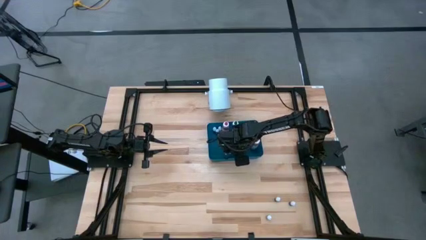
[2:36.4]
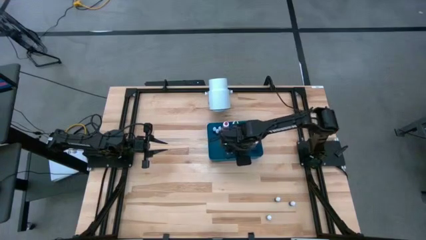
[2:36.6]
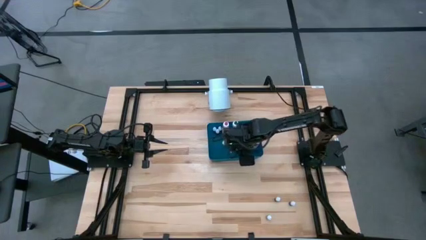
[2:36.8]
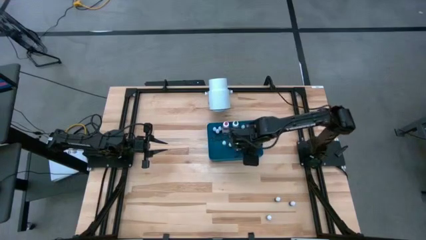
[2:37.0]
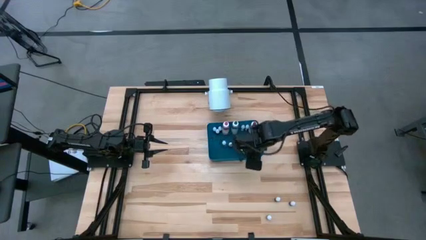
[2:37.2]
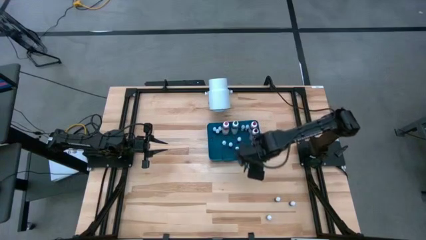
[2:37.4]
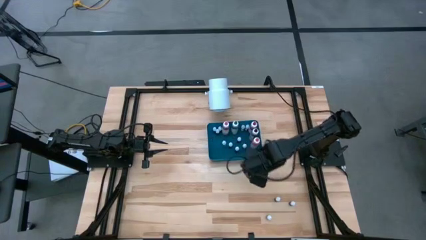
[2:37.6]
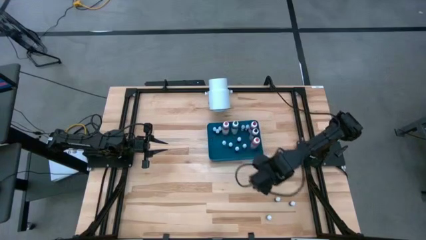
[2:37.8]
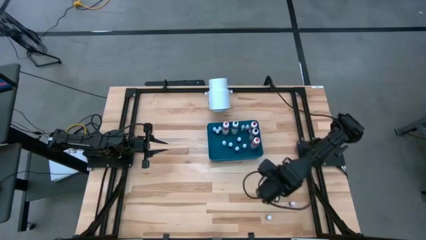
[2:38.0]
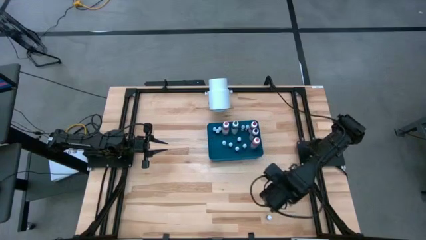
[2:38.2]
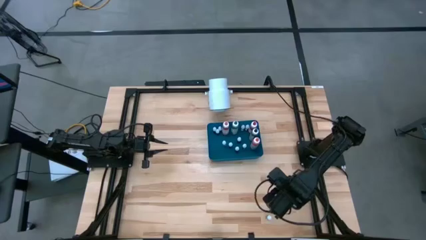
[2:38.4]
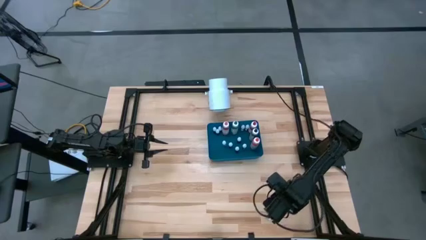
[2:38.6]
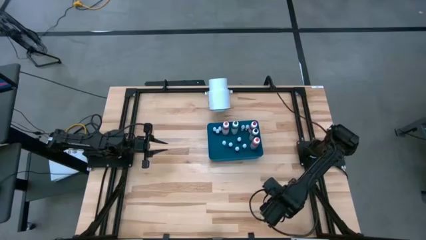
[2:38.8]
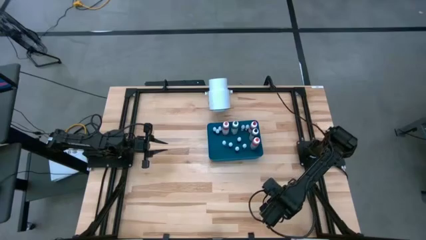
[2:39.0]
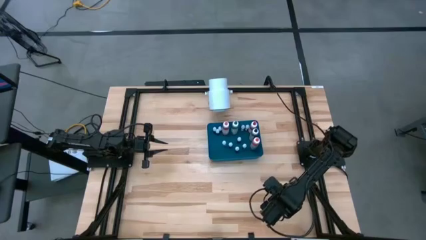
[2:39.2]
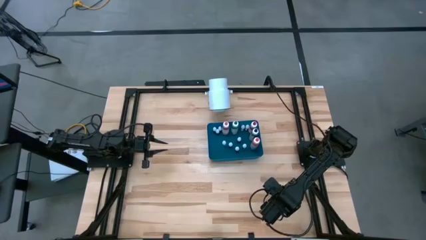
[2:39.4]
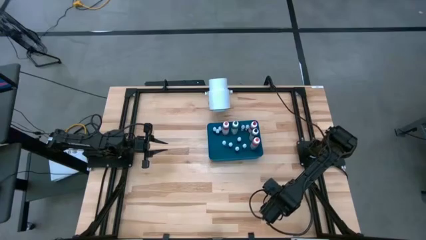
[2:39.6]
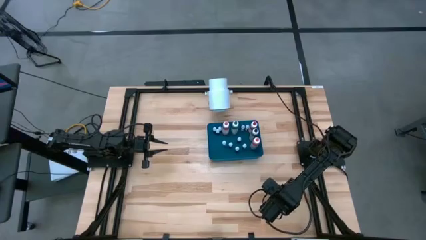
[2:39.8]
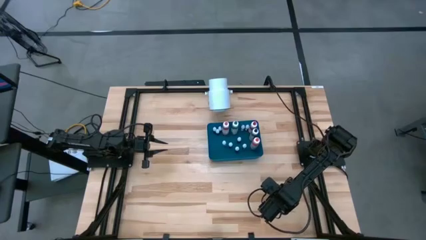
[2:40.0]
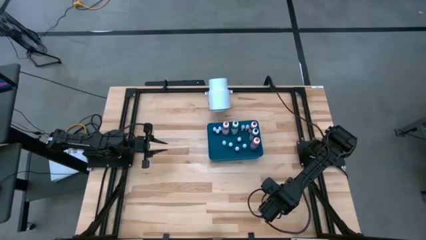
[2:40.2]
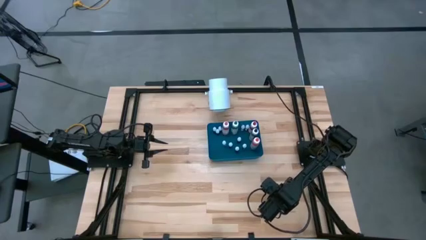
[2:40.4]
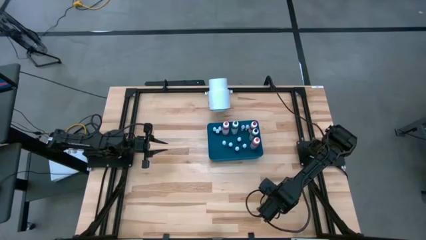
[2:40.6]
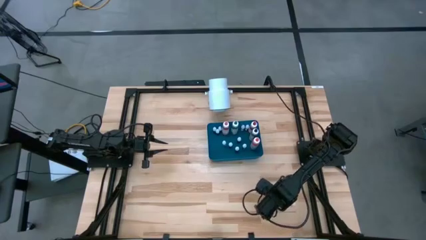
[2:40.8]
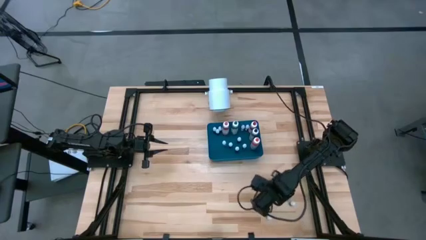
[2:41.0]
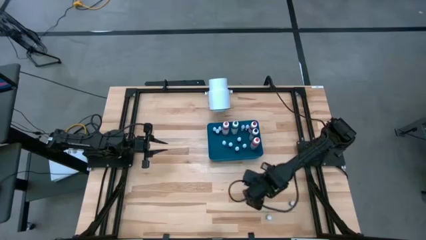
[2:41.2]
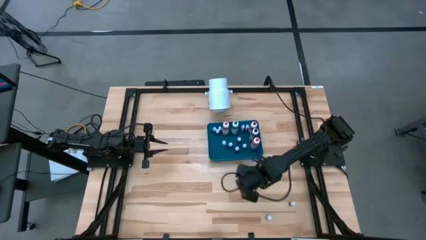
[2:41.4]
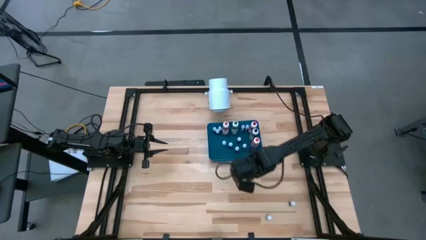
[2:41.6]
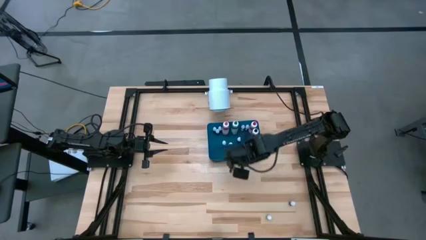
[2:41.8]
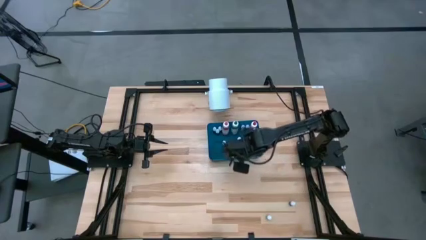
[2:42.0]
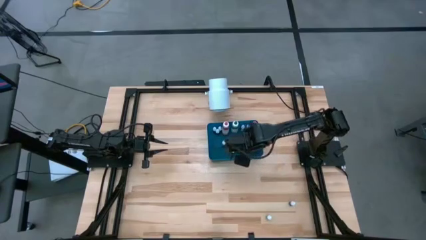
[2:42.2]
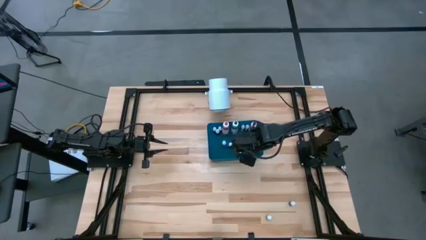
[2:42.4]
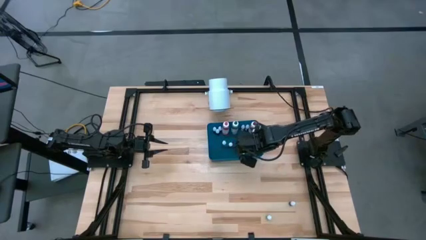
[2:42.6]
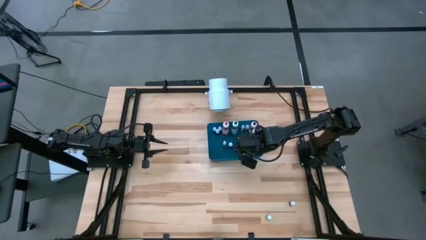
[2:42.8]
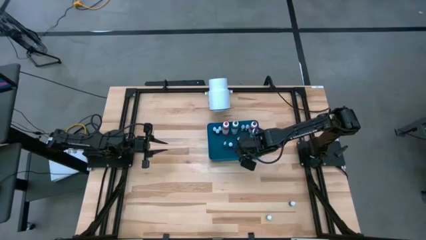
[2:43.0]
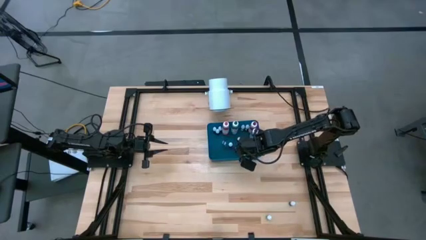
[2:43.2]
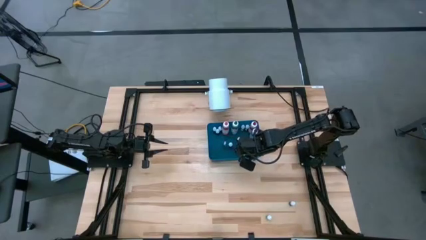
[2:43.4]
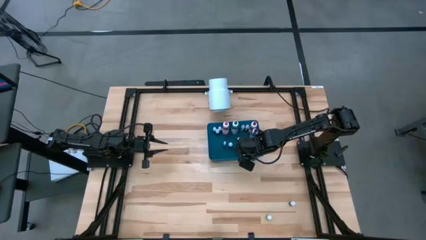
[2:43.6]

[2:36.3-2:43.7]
Task: Pick & Place food coloring
Put the top small black food coloring bottle into the blue bin

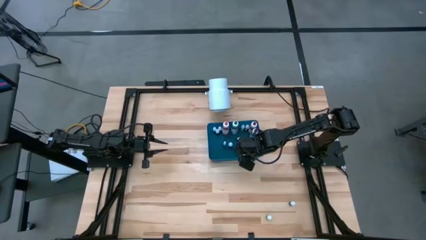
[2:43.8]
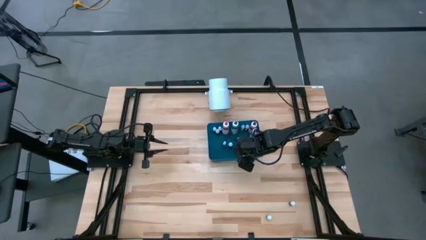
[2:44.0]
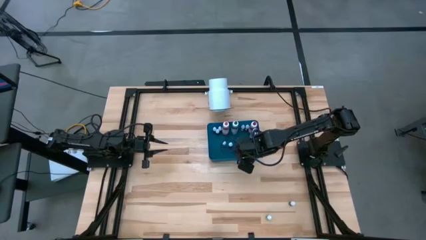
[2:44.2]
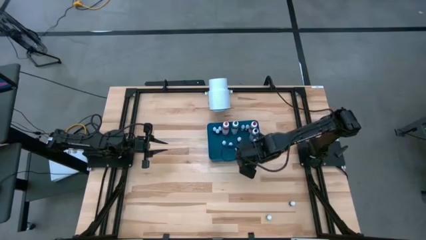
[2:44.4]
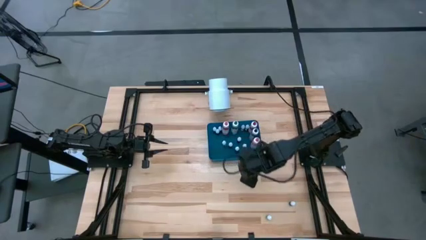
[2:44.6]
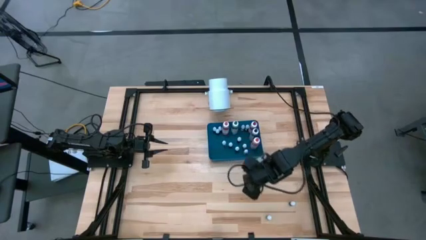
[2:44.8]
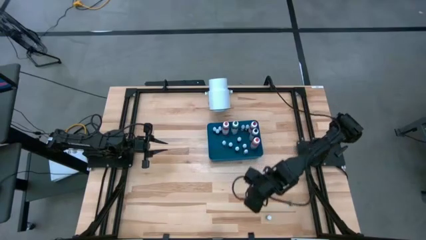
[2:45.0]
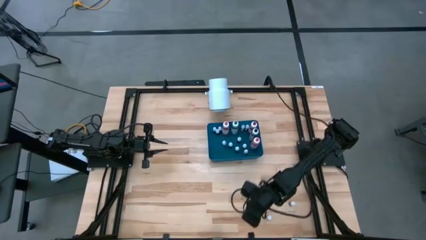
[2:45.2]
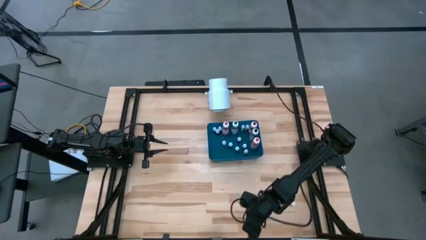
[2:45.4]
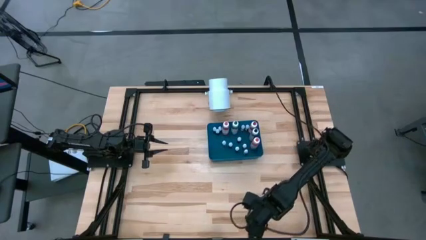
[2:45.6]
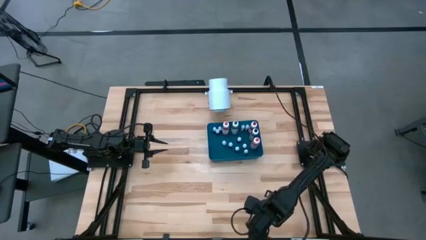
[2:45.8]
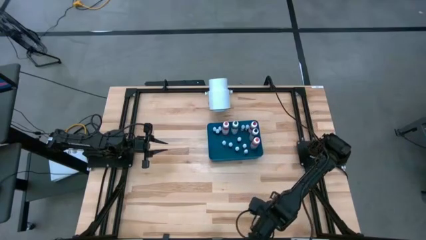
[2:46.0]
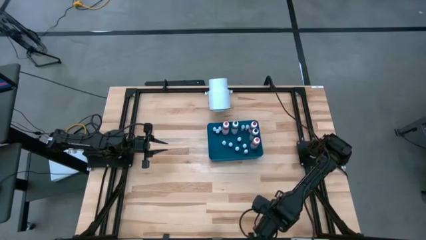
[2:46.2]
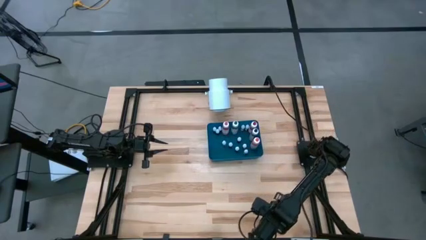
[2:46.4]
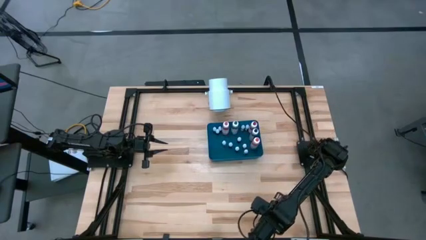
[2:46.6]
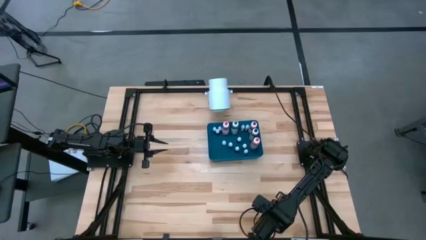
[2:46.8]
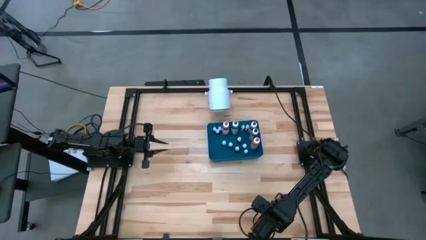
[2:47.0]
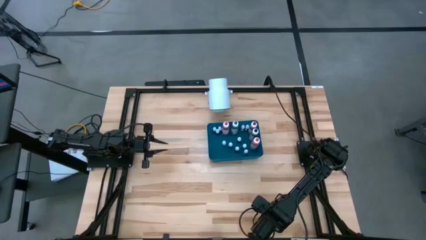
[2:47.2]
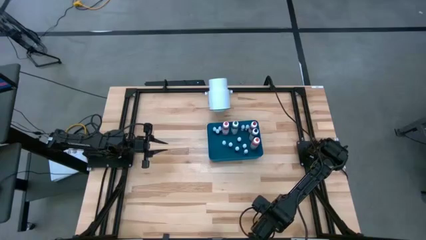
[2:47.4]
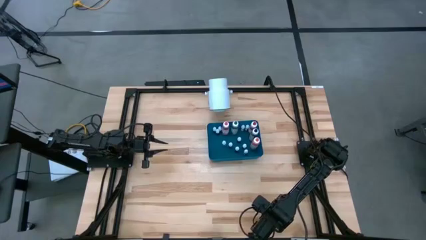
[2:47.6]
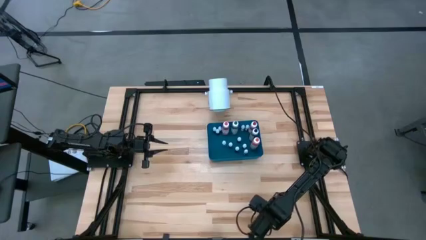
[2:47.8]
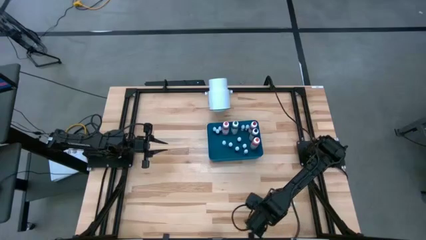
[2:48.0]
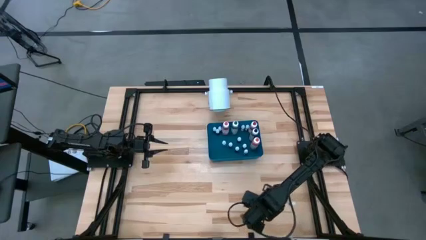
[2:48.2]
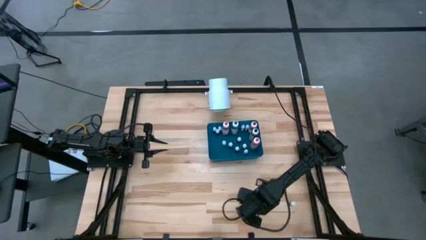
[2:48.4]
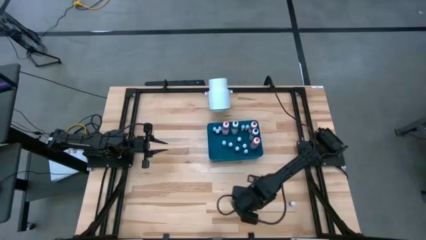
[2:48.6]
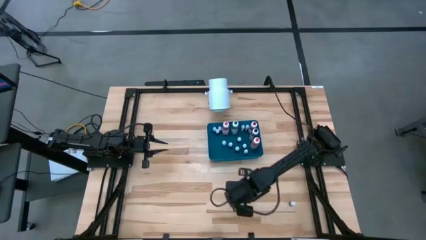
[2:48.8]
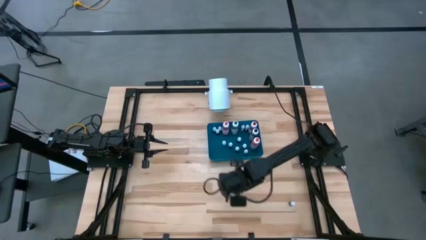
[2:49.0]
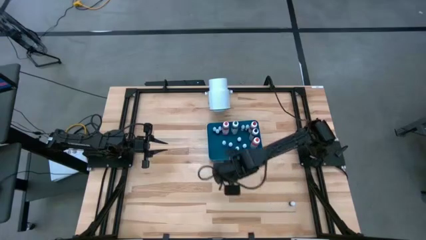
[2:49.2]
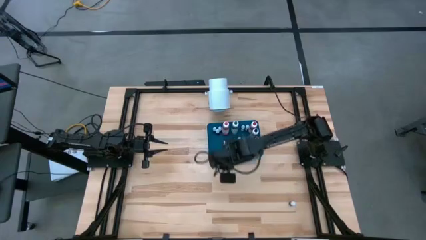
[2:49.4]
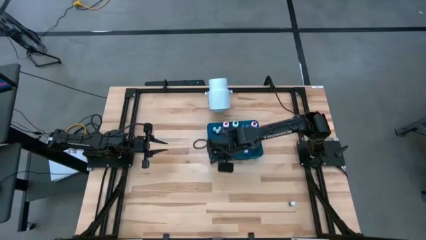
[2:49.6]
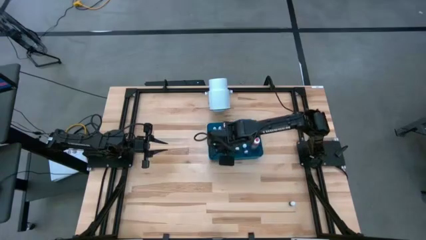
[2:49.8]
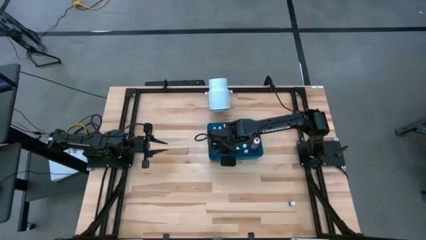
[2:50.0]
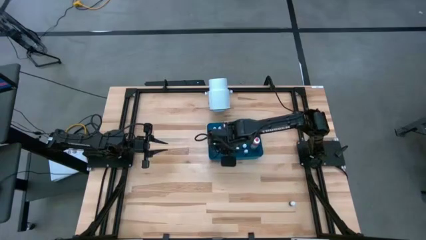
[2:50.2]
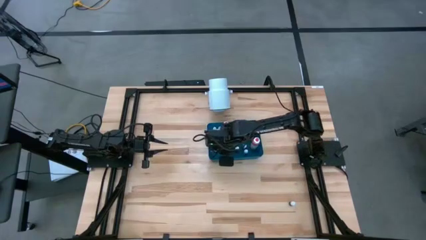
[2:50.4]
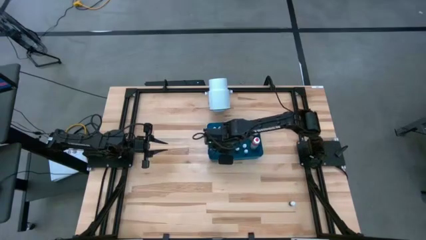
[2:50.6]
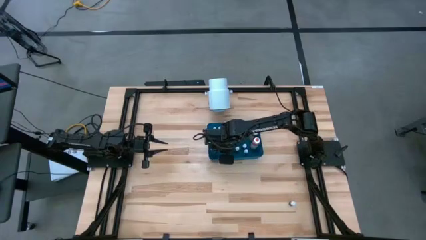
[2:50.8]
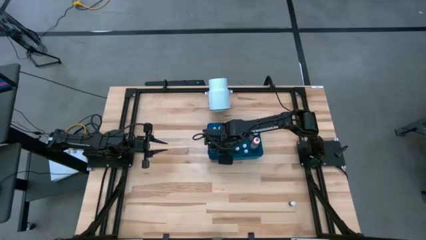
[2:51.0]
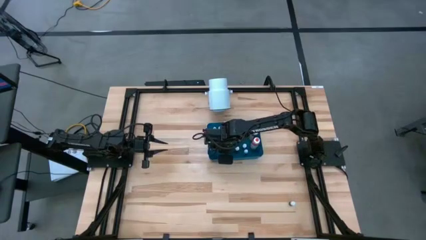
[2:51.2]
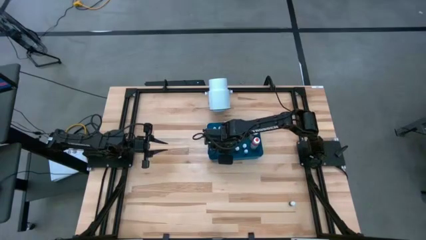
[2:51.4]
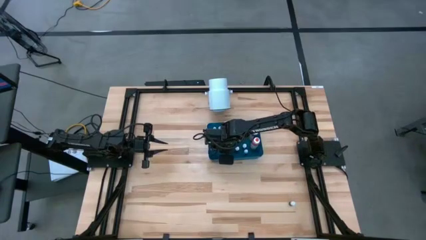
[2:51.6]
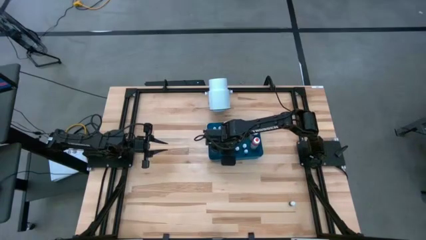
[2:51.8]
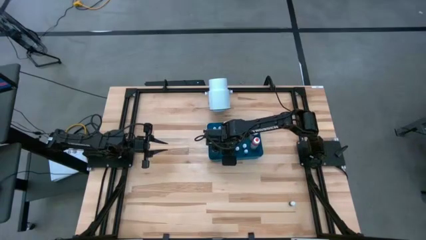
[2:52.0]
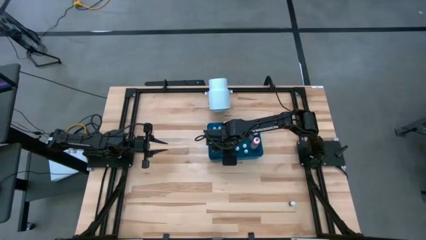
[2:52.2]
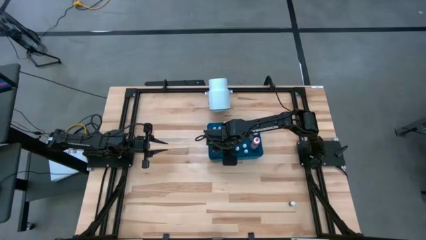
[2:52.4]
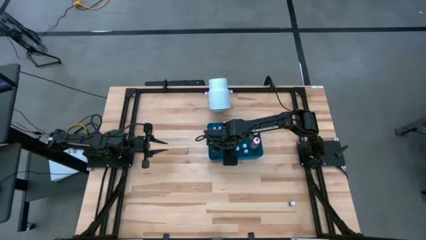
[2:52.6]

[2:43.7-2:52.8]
Put the small green food coloring bottle into the blue bin
